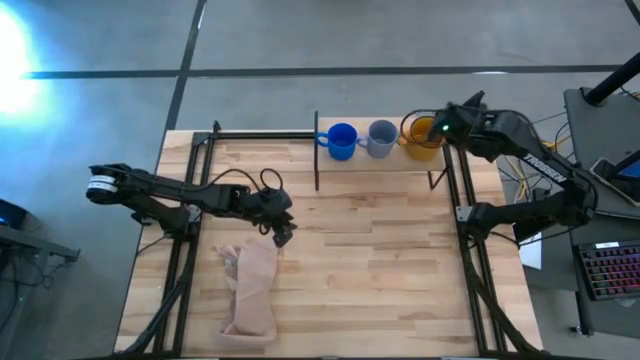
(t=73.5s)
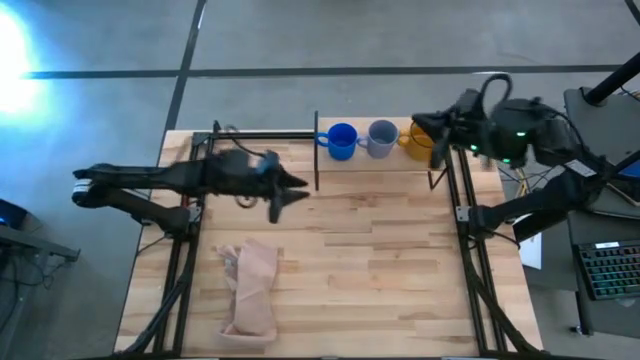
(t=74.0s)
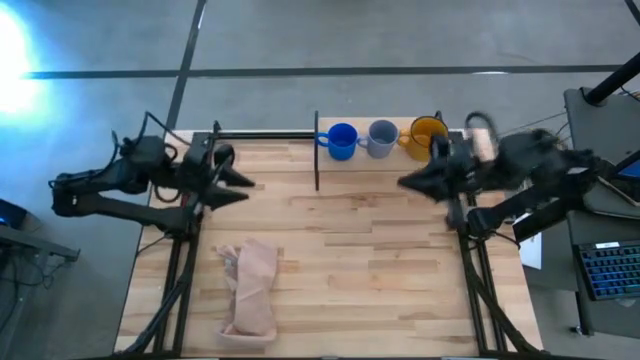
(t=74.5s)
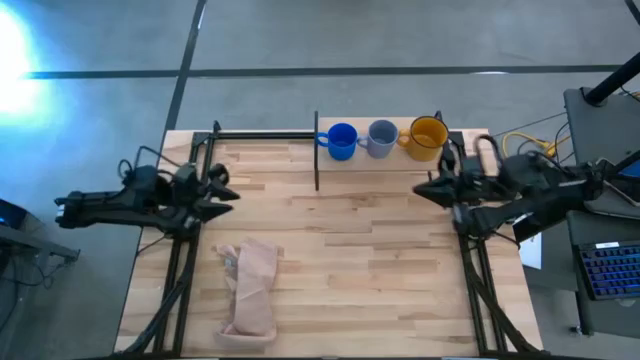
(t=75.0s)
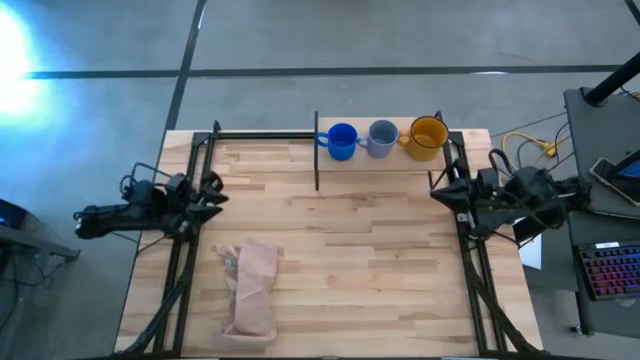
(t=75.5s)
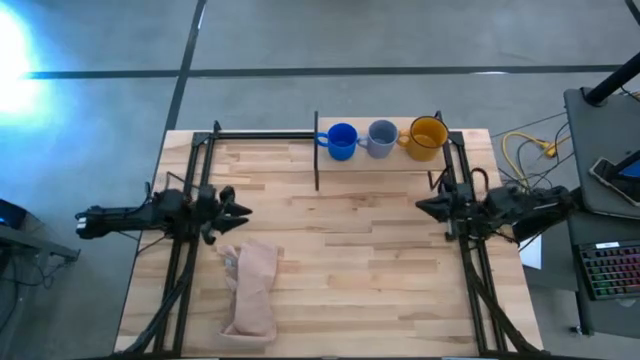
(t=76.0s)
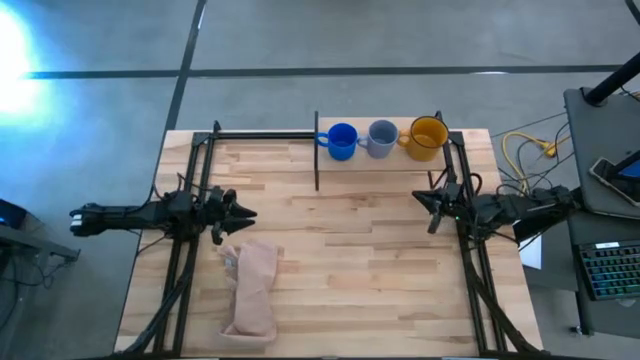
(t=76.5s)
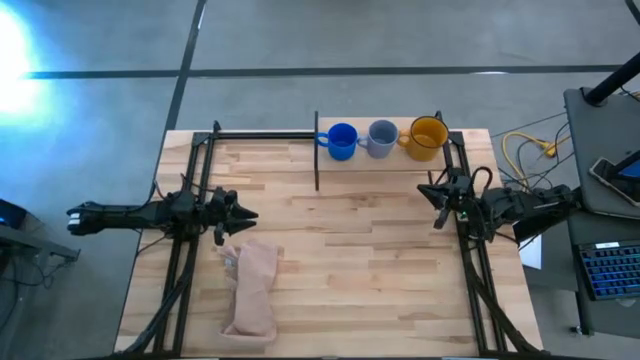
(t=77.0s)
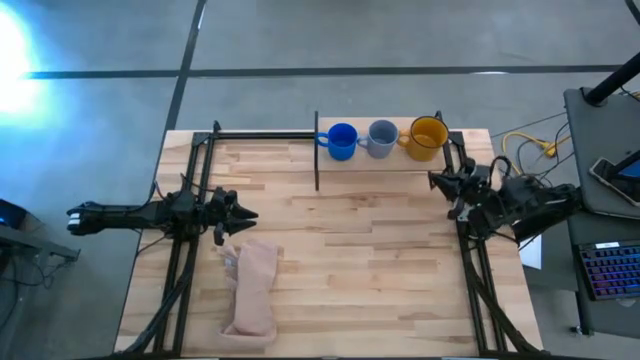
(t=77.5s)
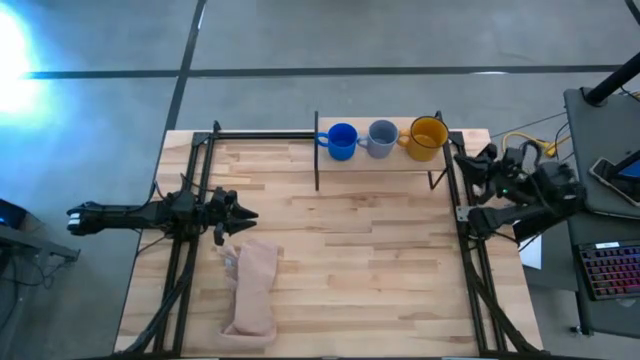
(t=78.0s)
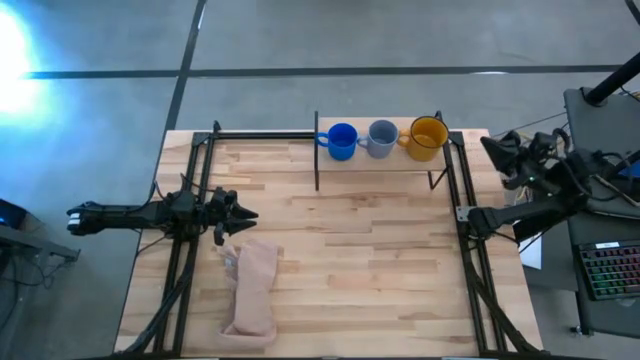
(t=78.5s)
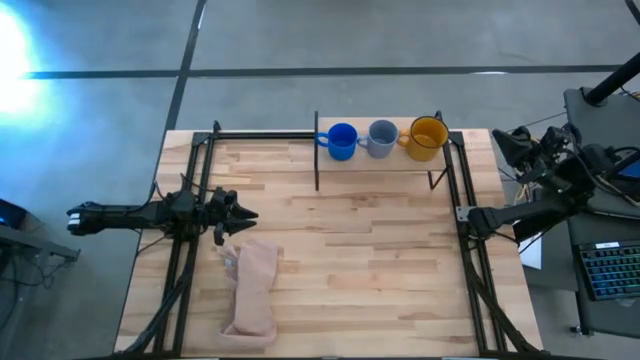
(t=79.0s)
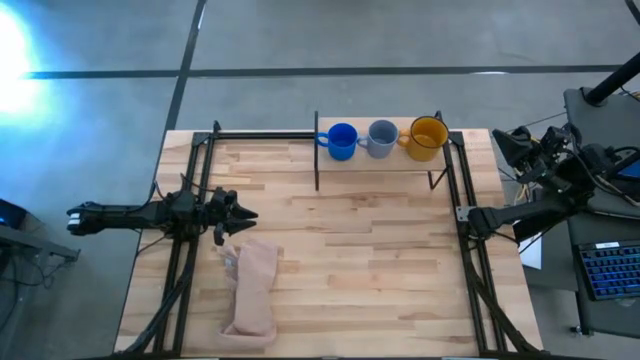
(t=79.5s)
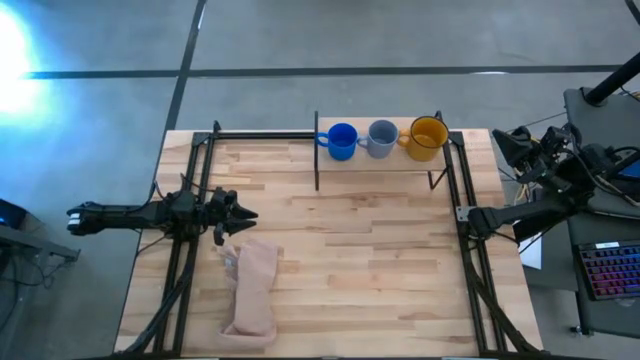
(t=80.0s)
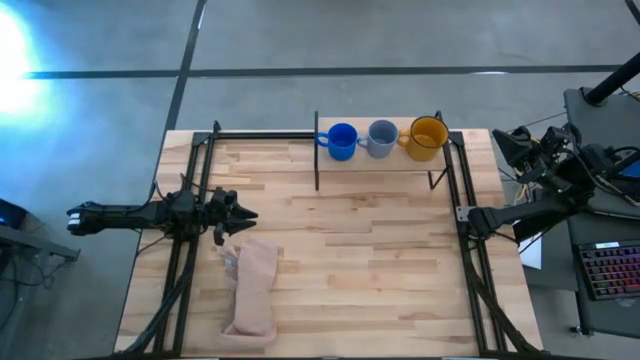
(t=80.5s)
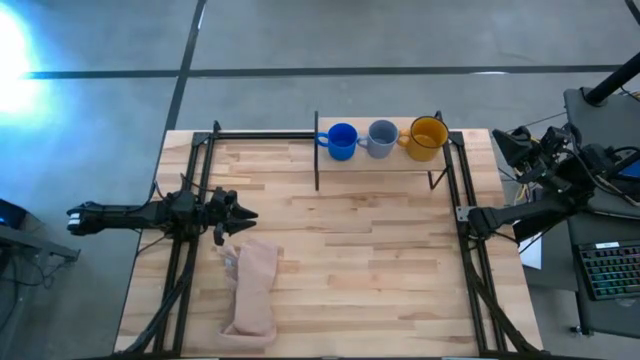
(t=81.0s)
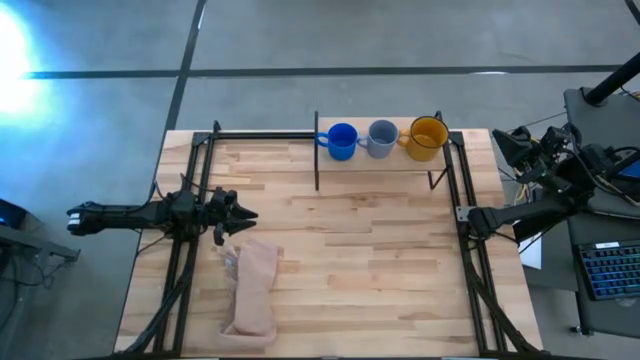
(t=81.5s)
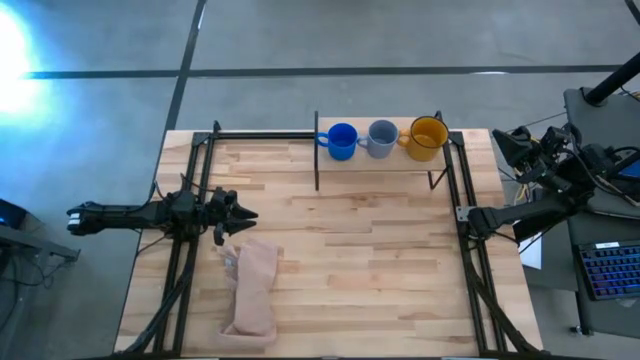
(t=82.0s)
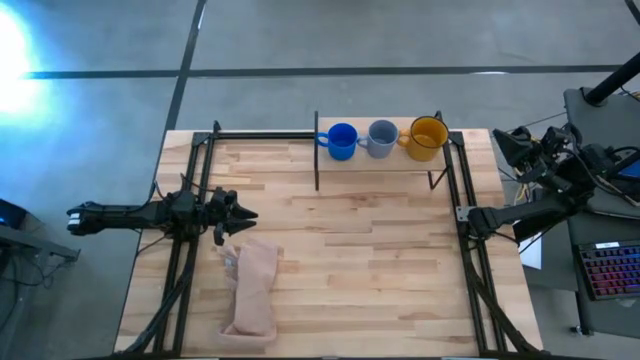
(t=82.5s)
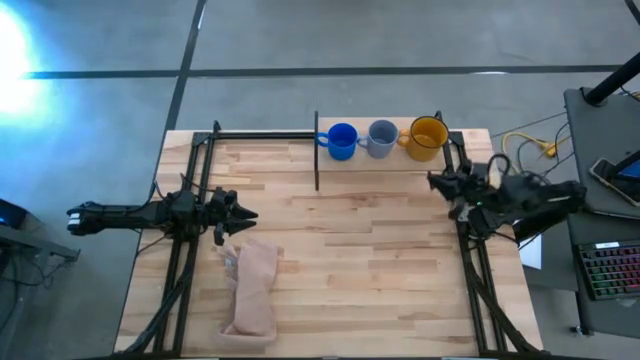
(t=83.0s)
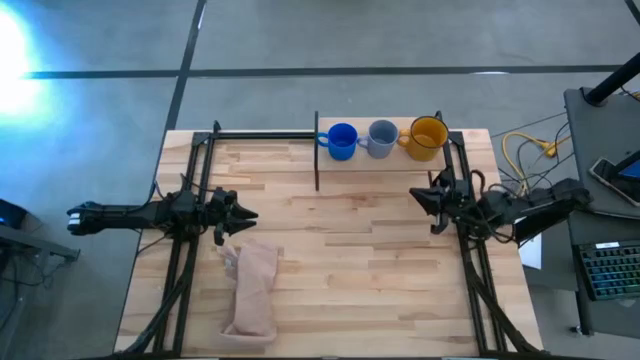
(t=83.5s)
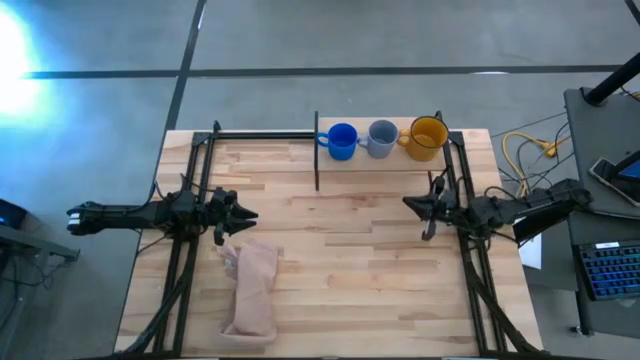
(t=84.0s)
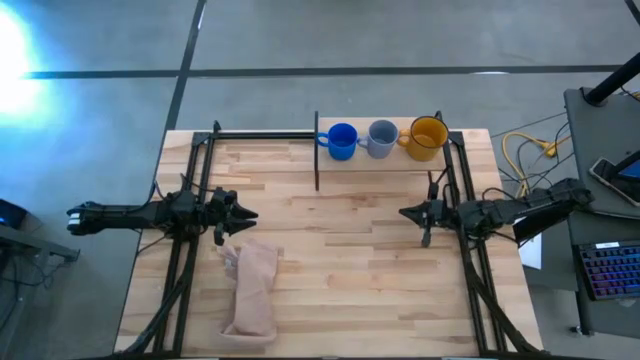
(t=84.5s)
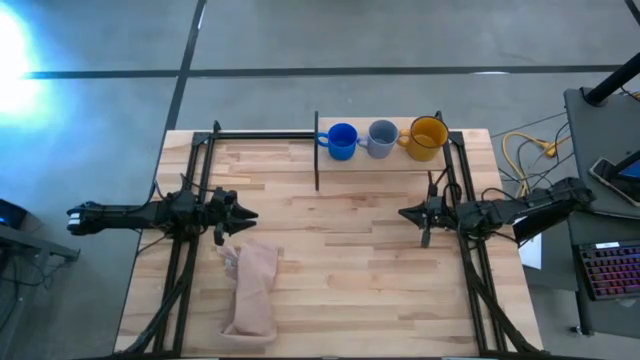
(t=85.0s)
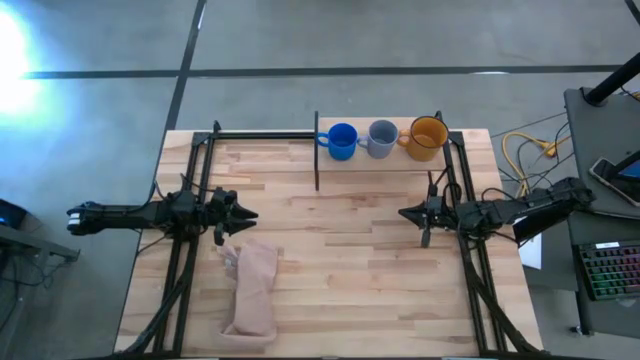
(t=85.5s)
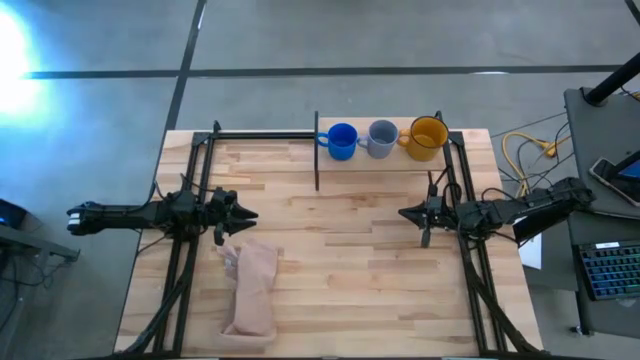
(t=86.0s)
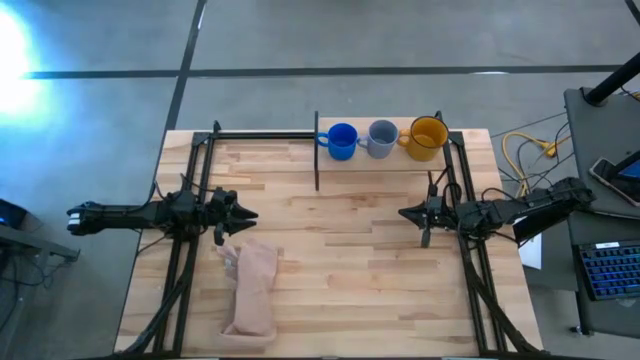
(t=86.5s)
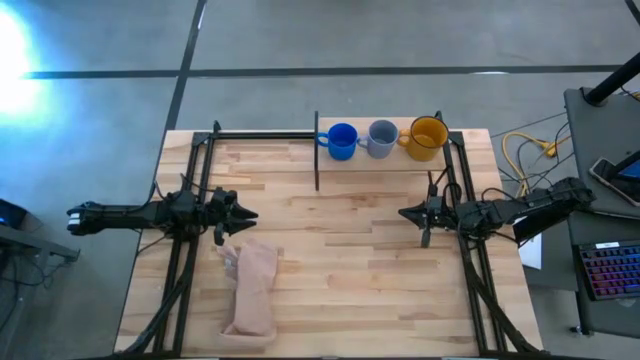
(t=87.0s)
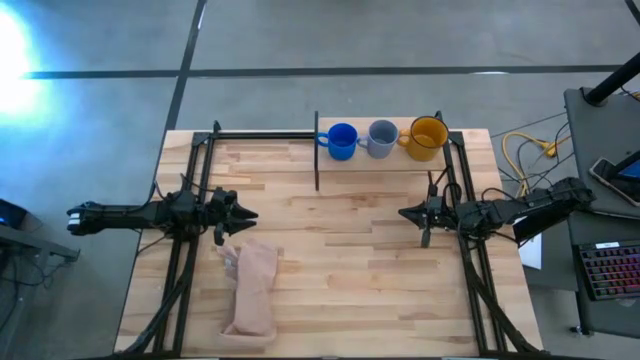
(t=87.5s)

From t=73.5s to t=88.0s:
Task: Stack small to large cups/mugs on shelf
Return to Home Position

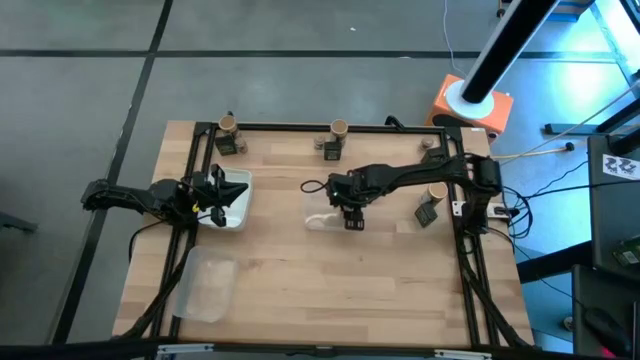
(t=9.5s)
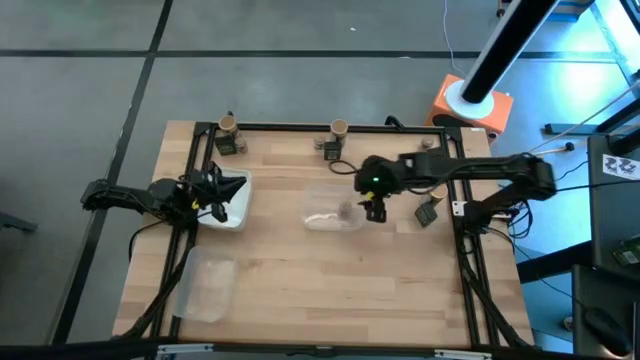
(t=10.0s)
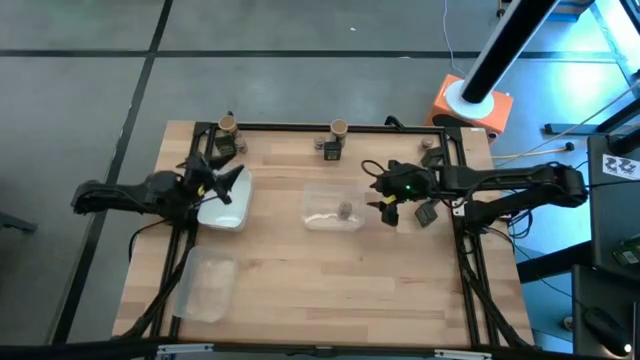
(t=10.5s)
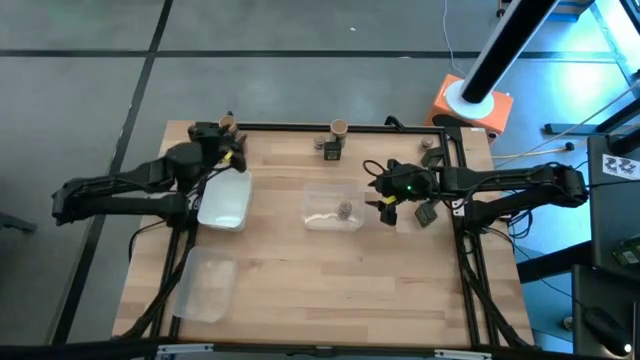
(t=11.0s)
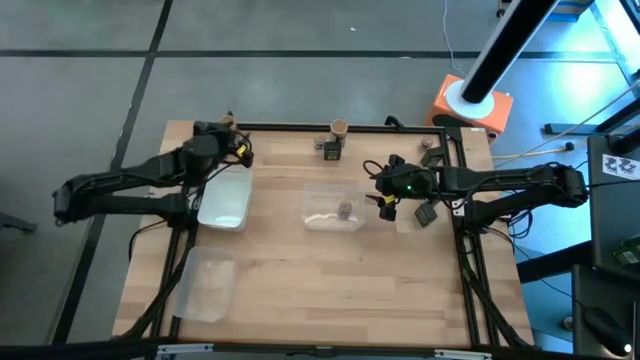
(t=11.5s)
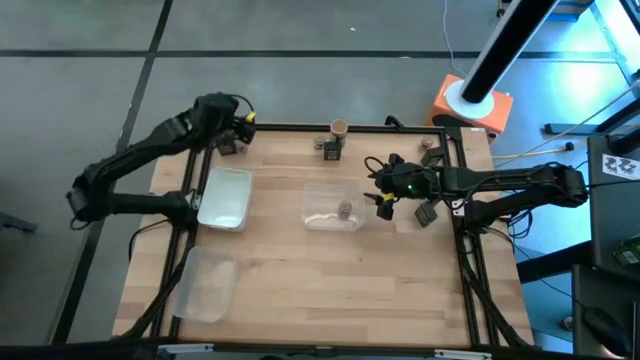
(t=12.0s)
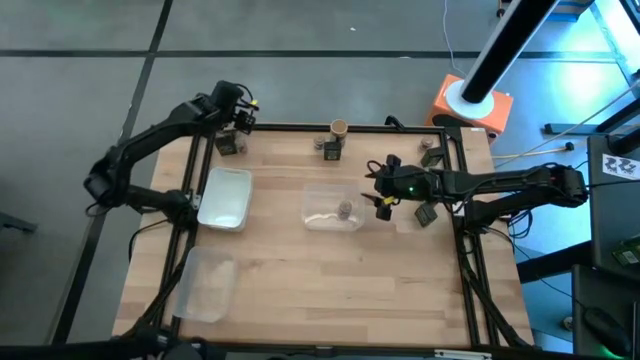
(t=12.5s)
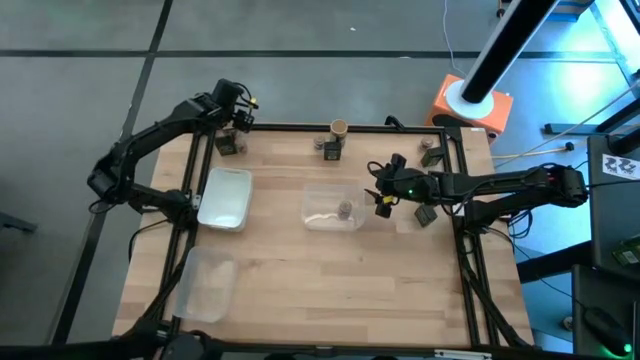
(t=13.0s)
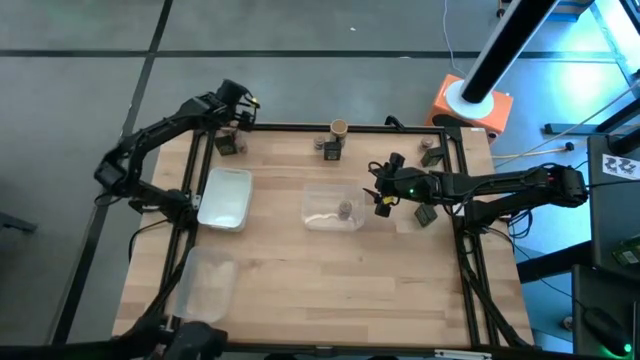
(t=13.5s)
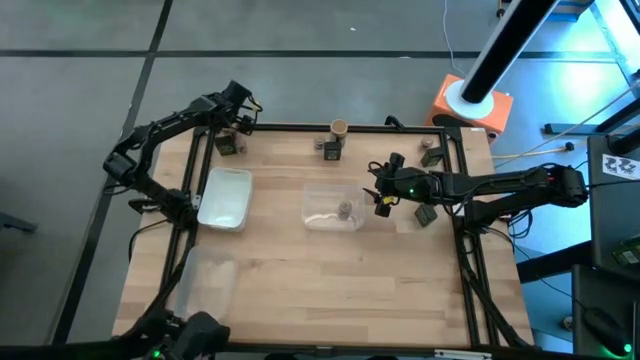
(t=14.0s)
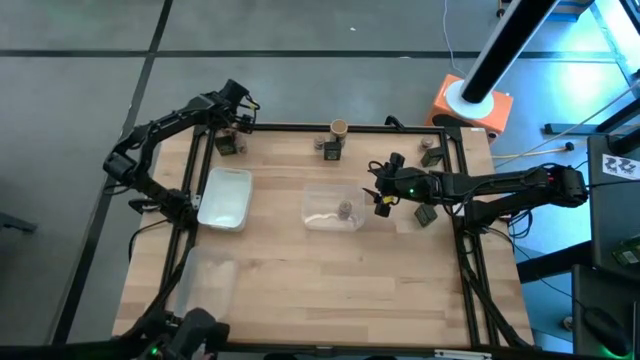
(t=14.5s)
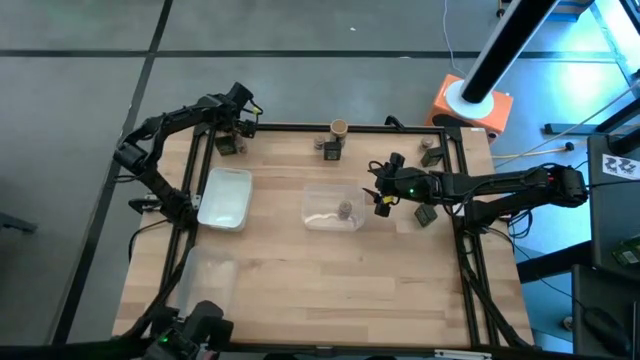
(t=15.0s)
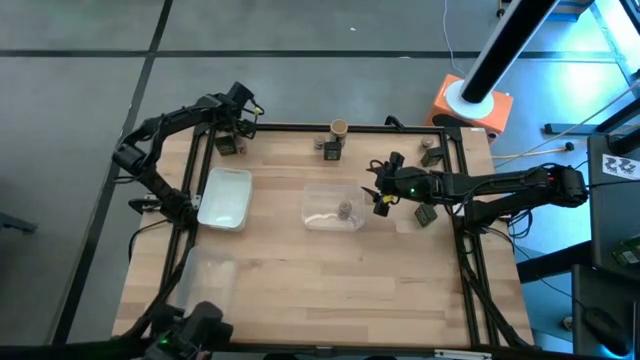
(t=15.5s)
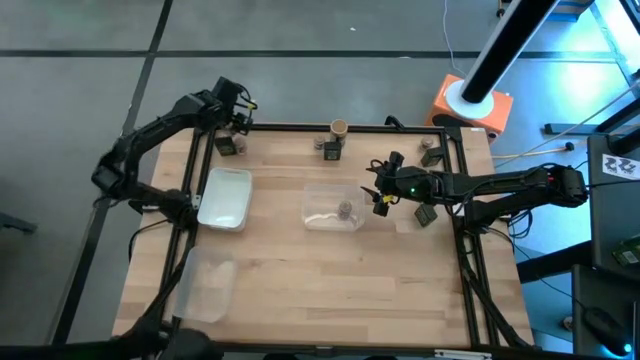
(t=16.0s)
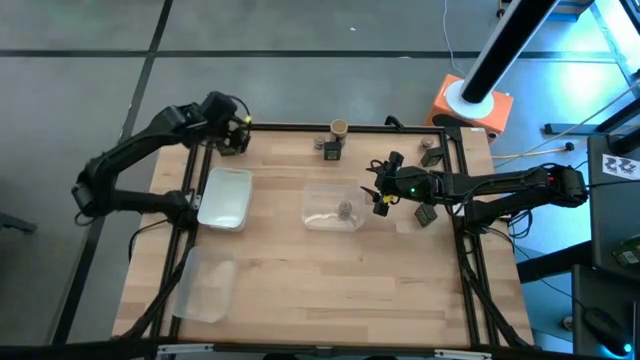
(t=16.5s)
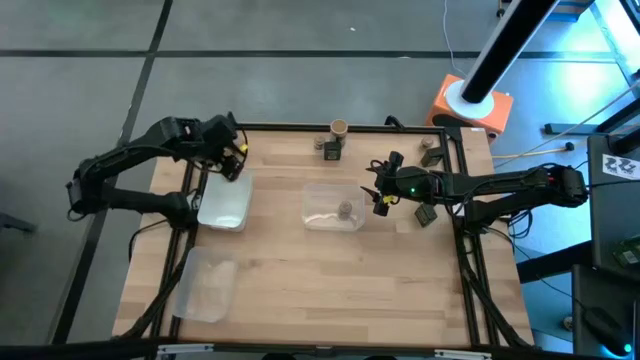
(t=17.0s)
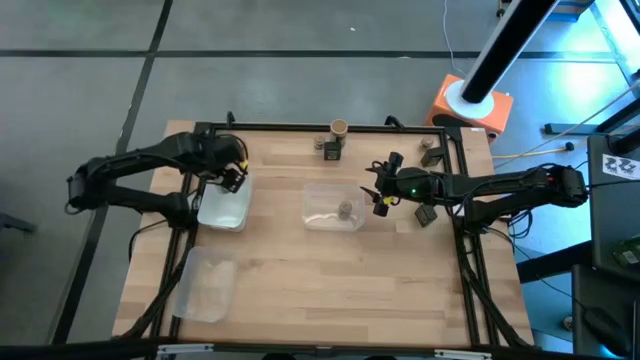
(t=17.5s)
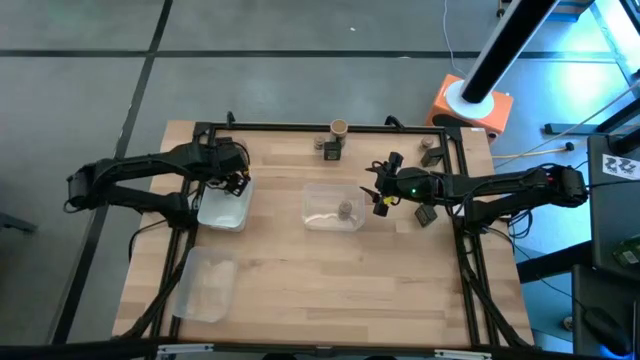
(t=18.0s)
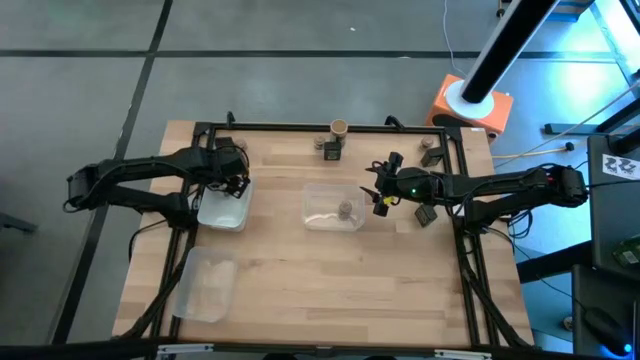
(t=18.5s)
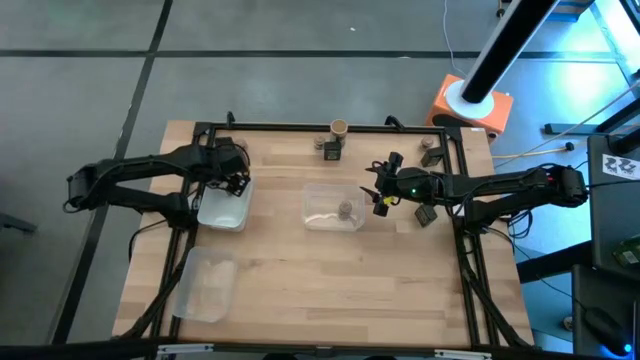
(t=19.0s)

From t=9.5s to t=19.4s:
Task: Sort spices by type
Put the gold seasoning bottle into the white bin
